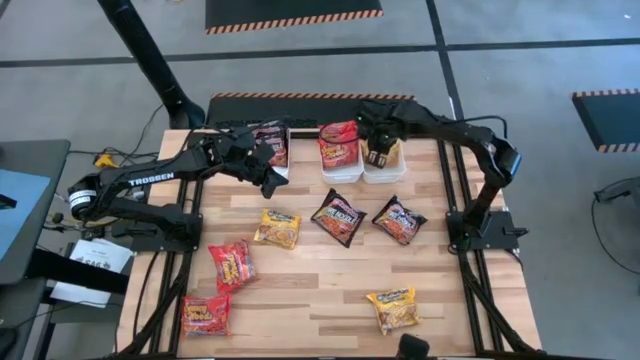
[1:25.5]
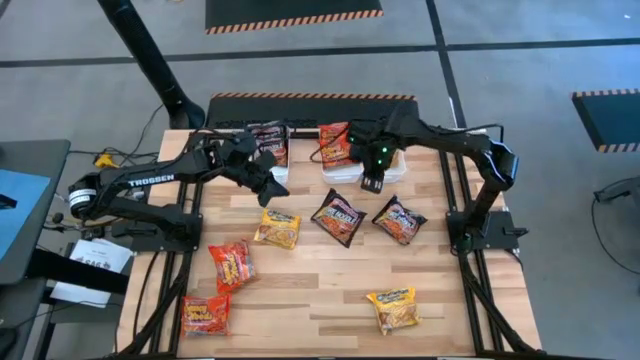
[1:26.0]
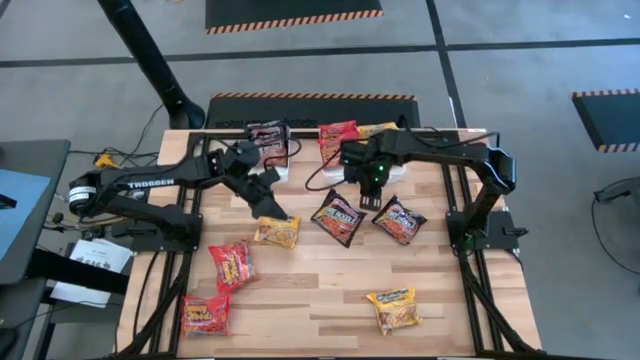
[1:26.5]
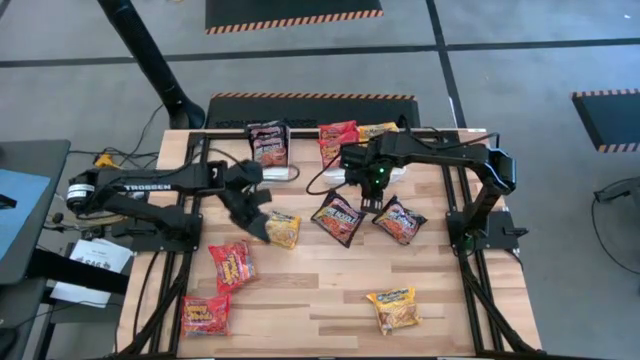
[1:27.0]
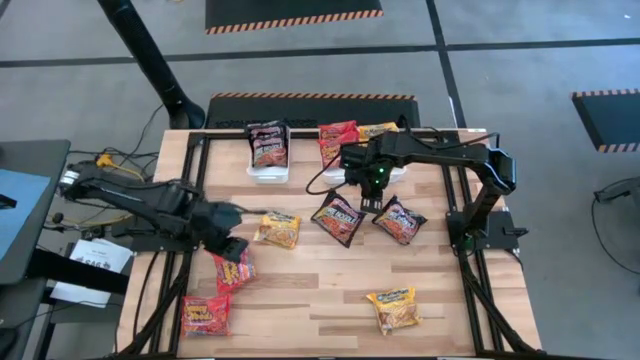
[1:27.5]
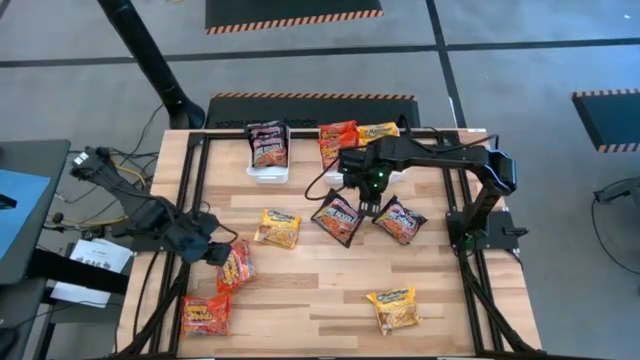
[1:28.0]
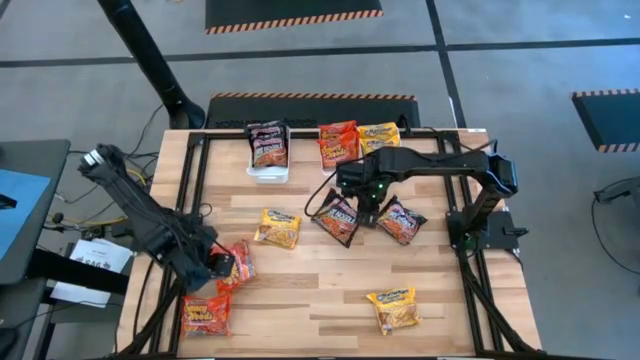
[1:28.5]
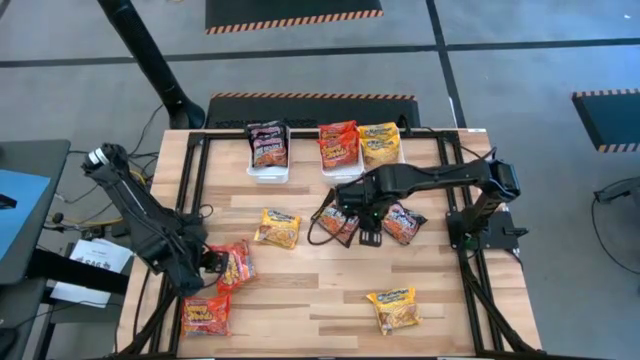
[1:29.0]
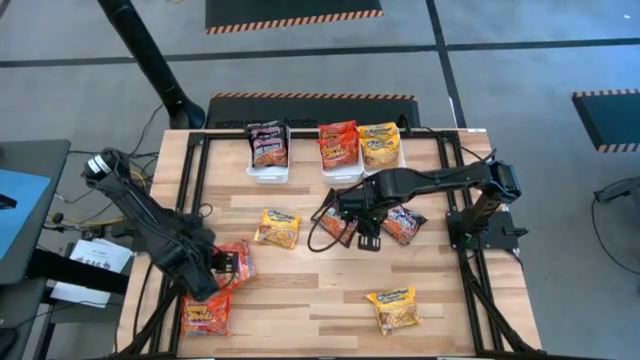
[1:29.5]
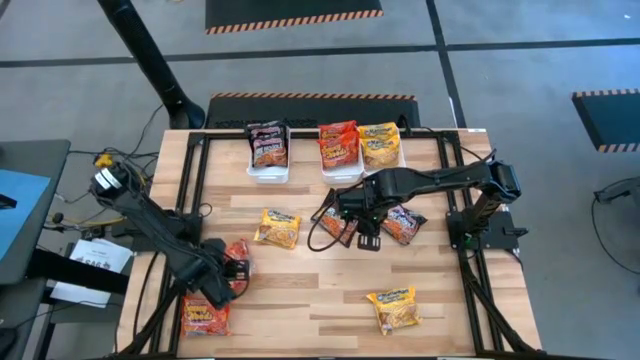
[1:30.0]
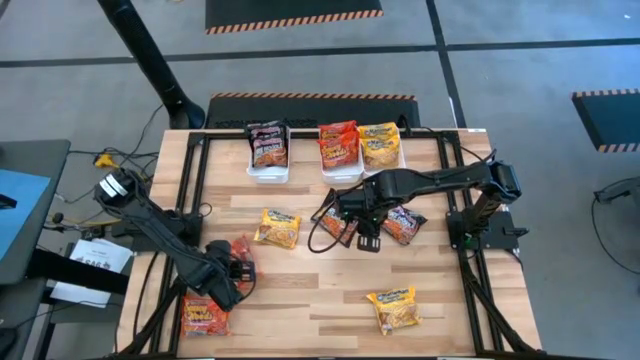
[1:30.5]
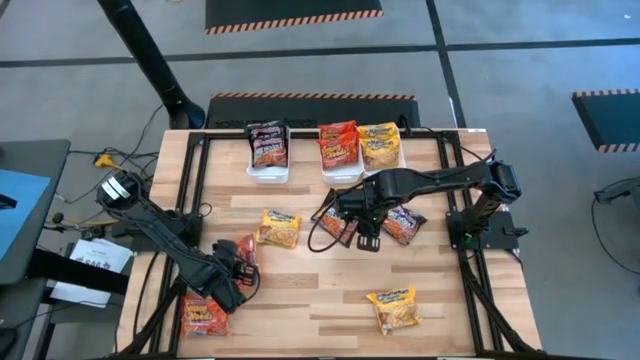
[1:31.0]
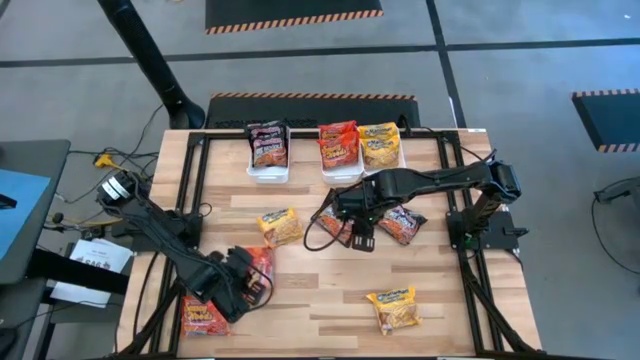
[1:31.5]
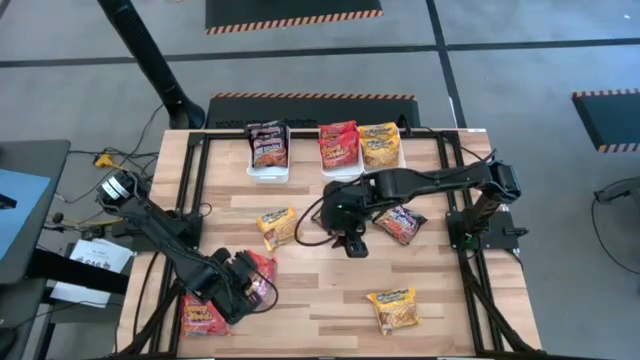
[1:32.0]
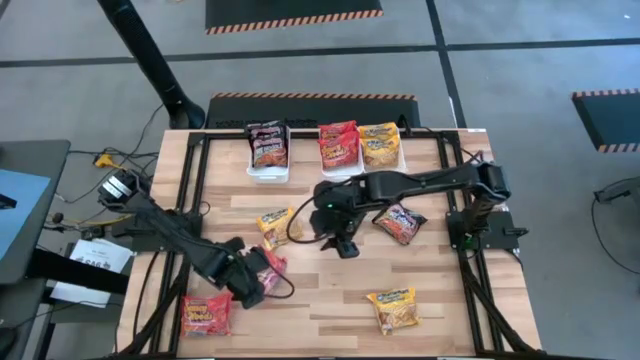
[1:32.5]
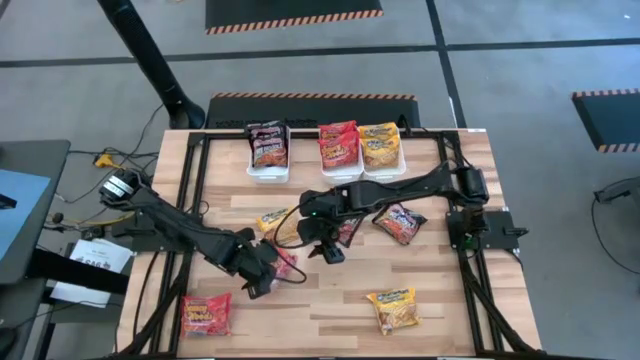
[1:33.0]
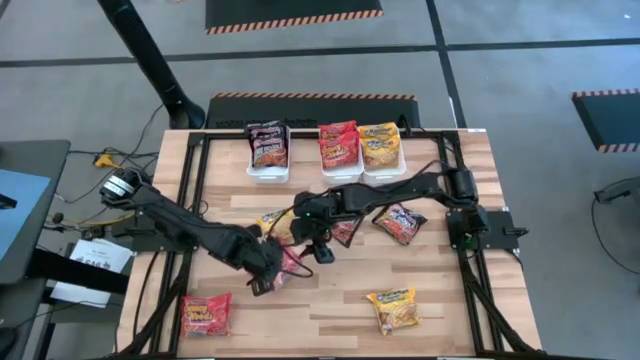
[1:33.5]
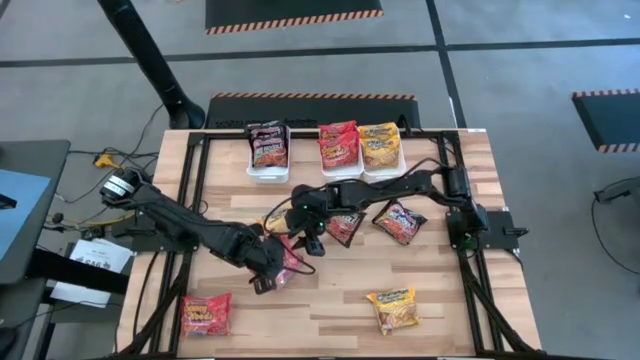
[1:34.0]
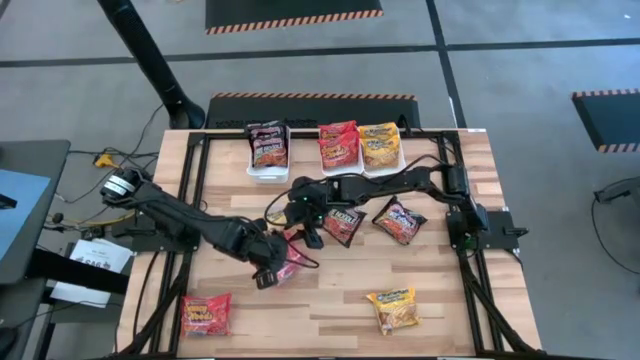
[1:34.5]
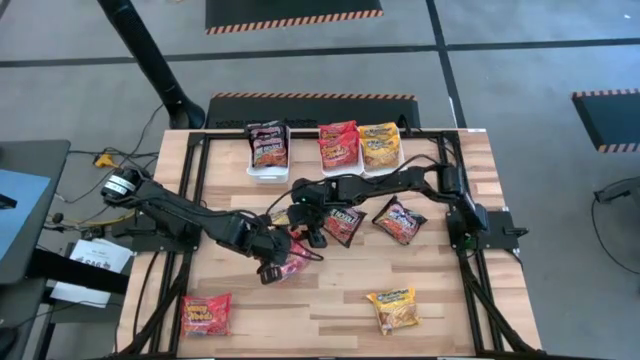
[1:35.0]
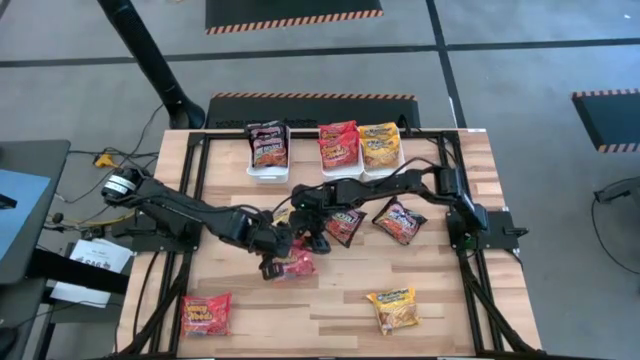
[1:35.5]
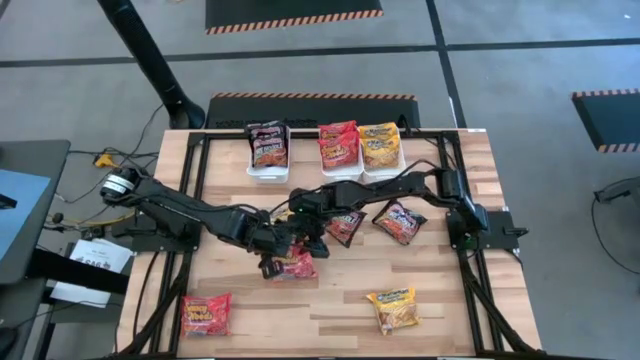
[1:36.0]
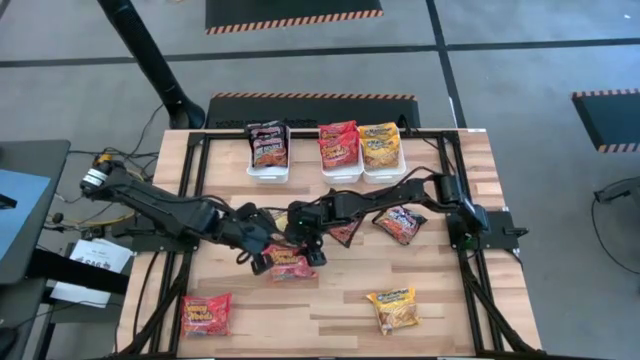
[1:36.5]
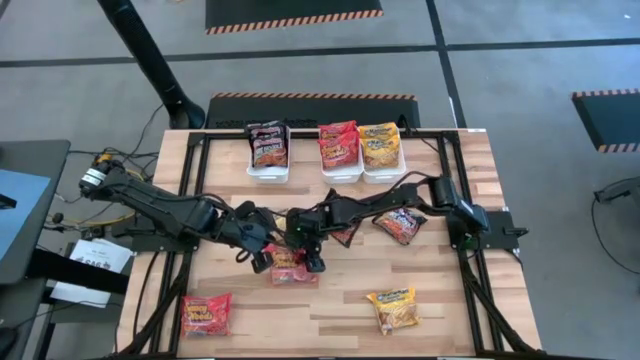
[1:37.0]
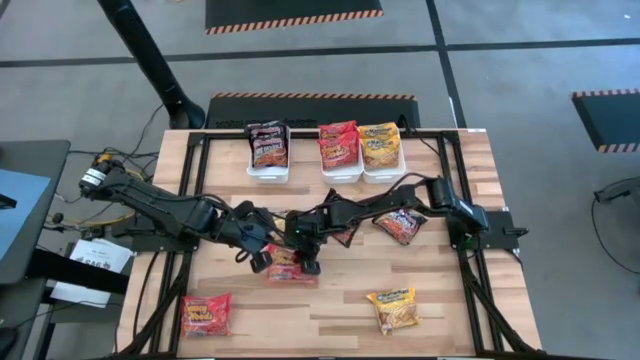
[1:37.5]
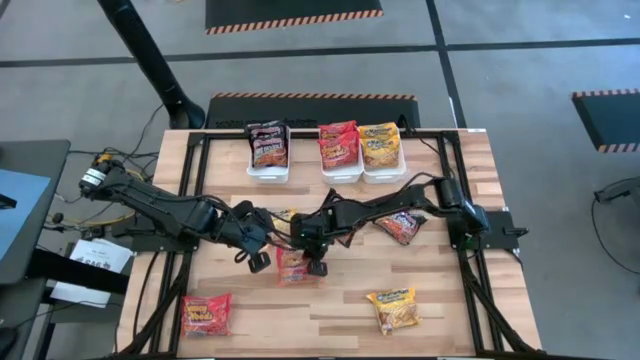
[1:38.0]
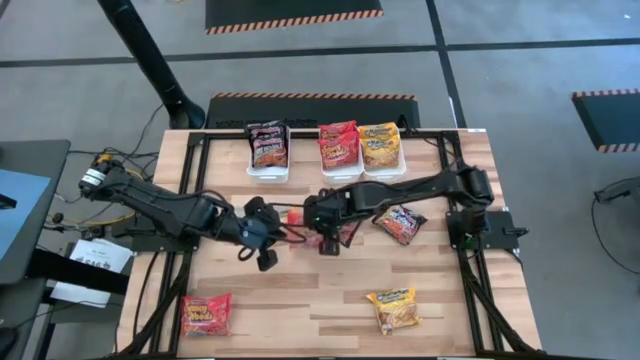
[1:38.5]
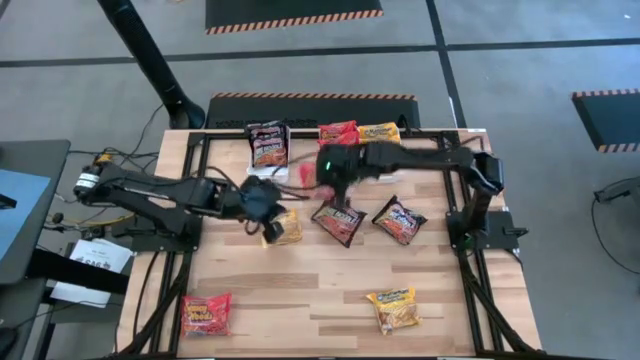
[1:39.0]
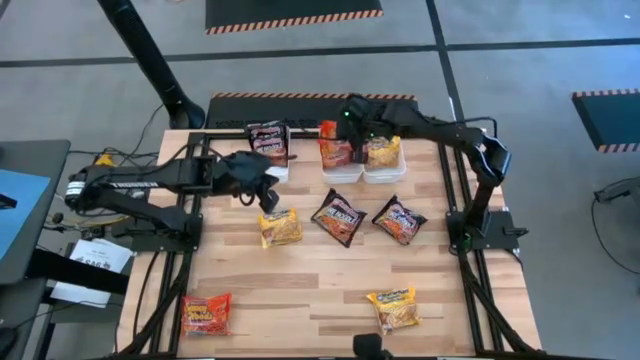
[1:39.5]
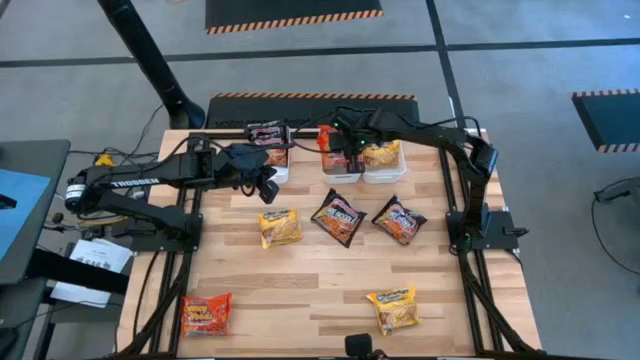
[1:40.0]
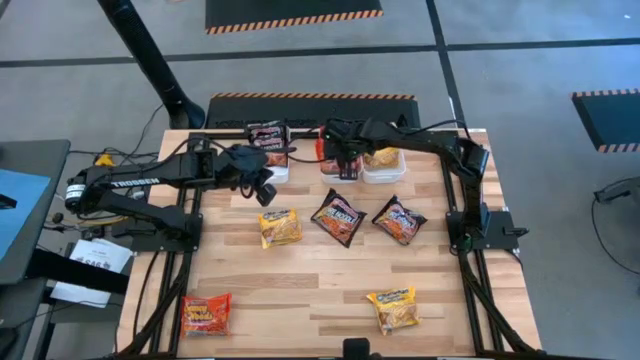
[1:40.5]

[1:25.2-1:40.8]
Task: Sort Maruchan noodles
Put the red noodle pack into the middle white bin

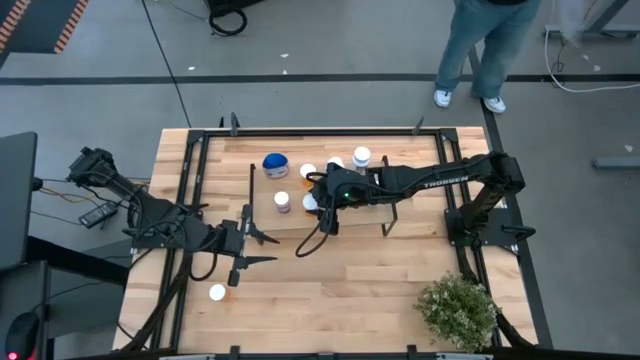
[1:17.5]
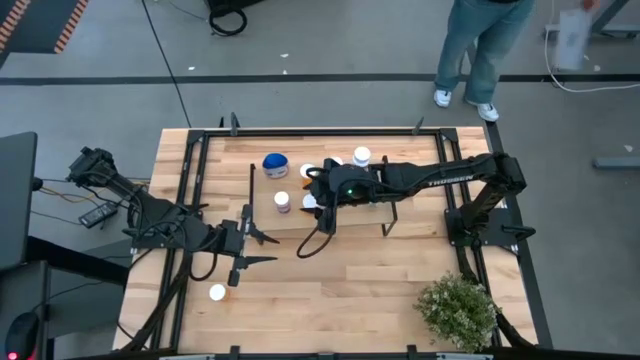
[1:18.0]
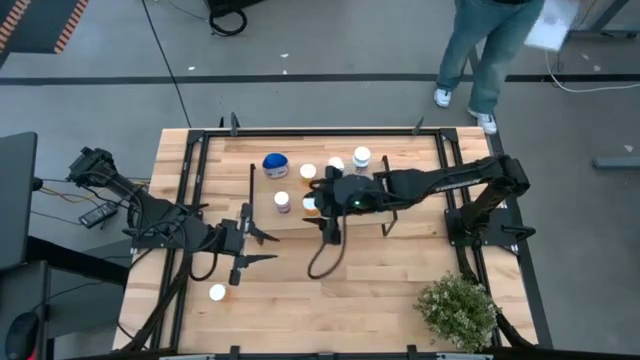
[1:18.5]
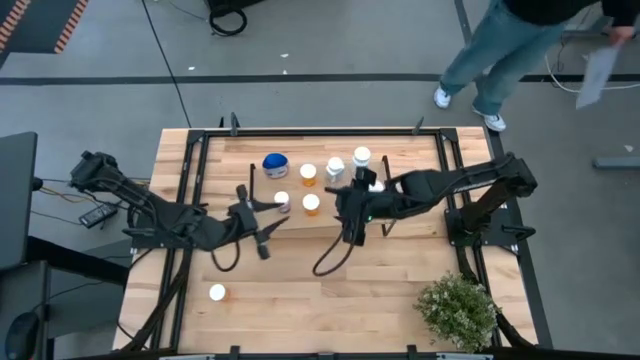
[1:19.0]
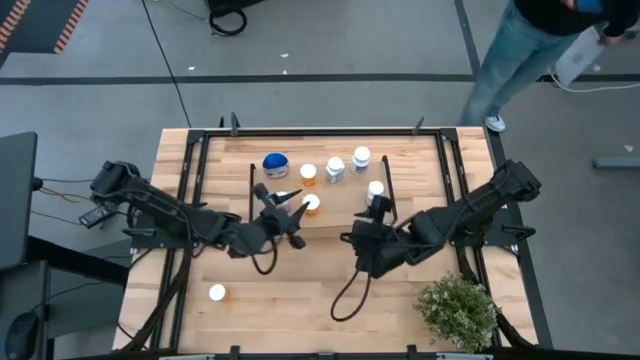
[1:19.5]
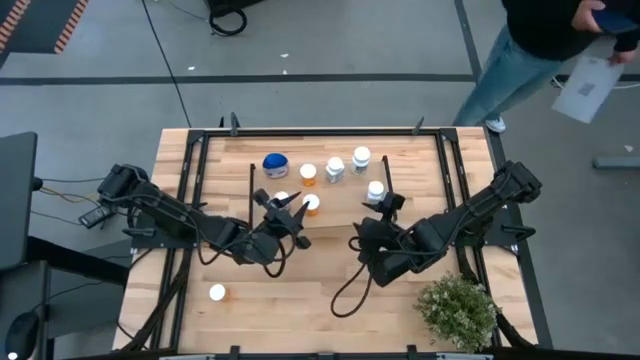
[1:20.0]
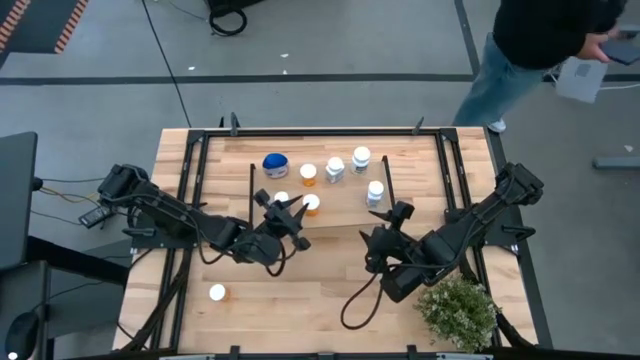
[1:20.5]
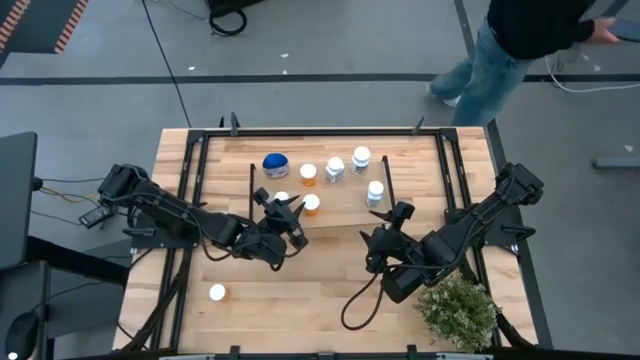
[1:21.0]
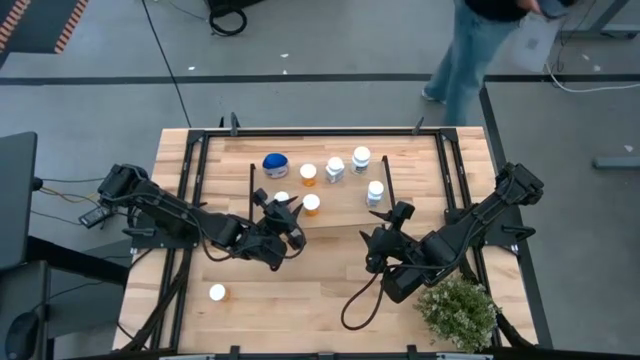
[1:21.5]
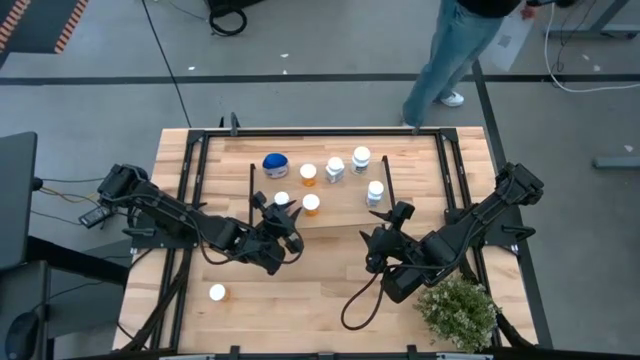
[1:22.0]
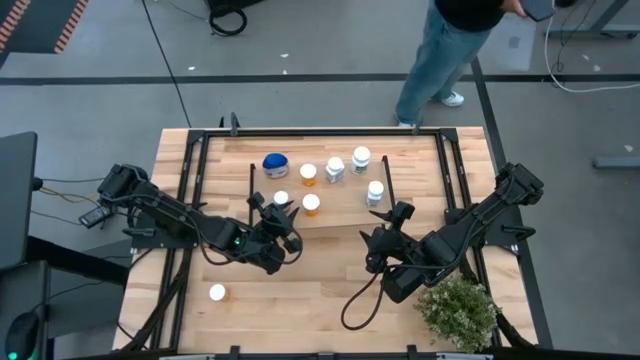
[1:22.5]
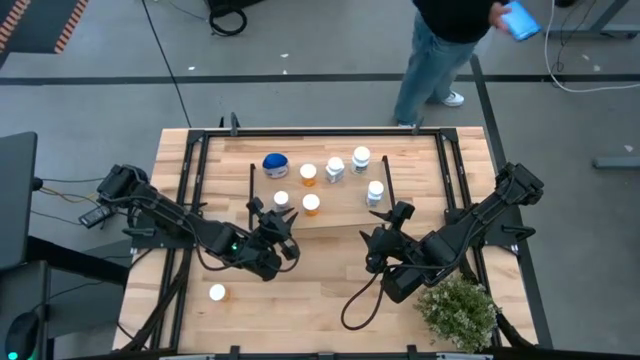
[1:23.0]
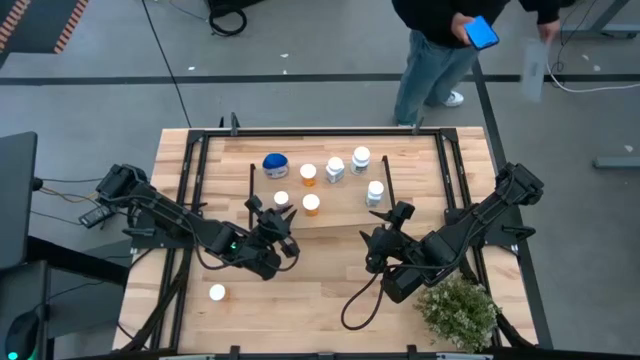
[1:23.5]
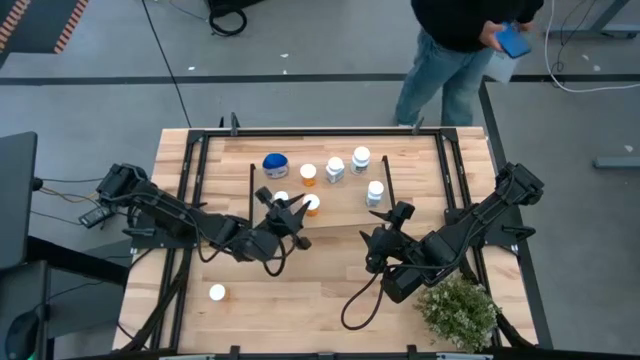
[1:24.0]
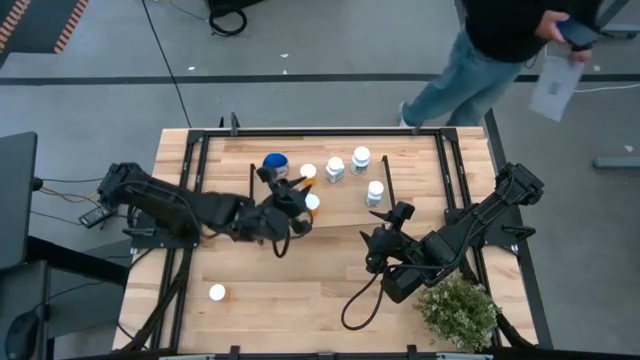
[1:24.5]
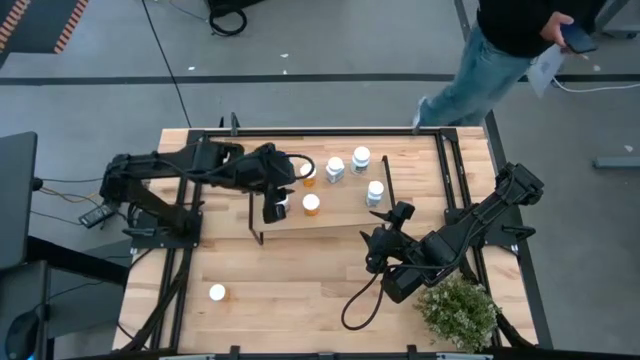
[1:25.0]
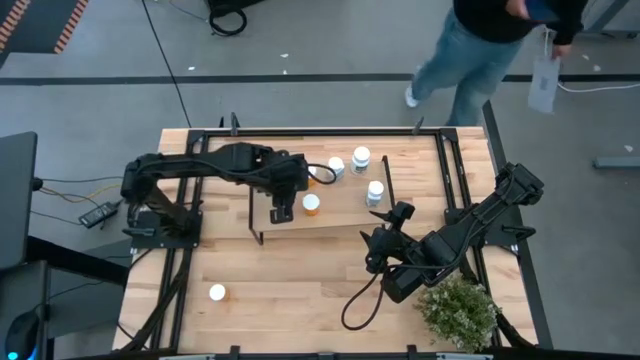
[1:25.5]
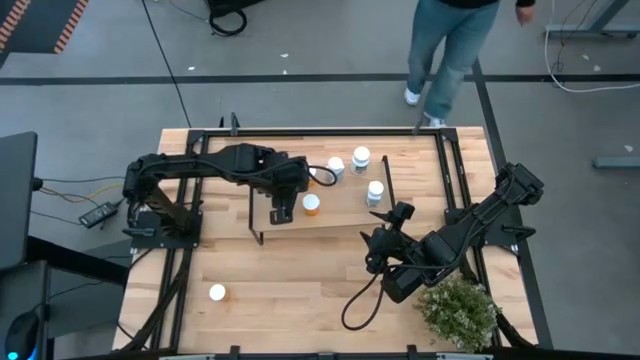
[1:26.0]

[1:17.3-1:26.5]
Task: Pick and place medicine bottles onto shelf by color
Adjust the pink bottle
